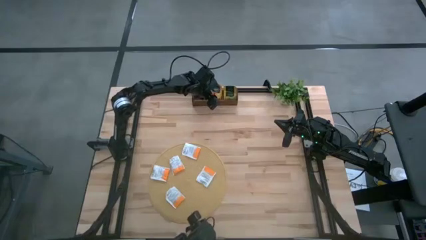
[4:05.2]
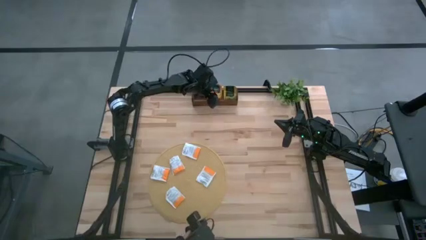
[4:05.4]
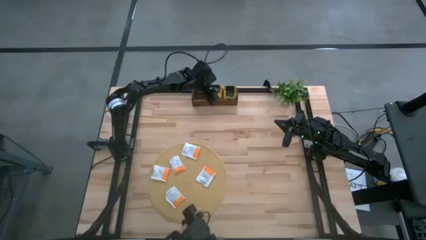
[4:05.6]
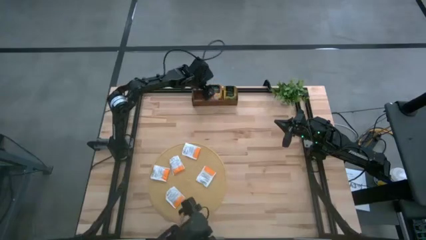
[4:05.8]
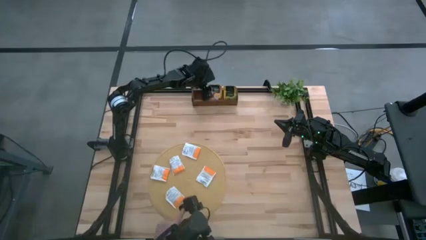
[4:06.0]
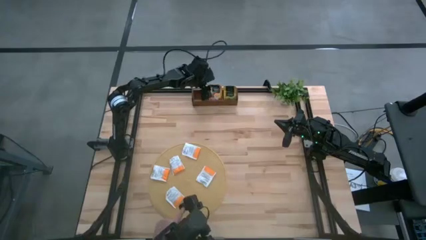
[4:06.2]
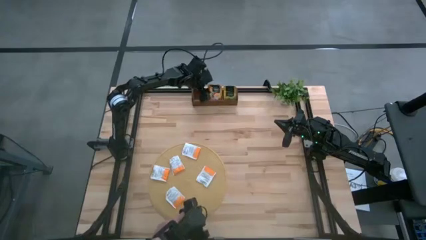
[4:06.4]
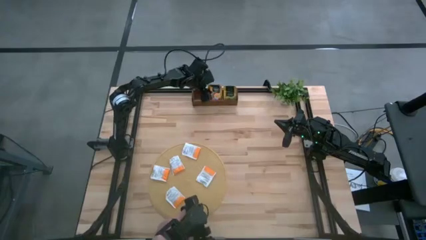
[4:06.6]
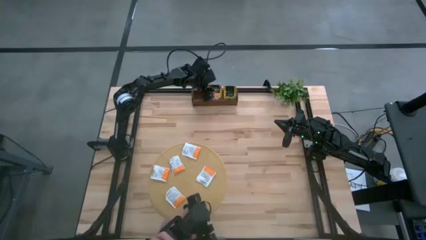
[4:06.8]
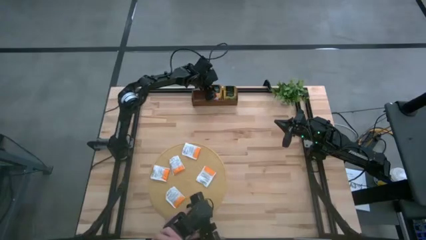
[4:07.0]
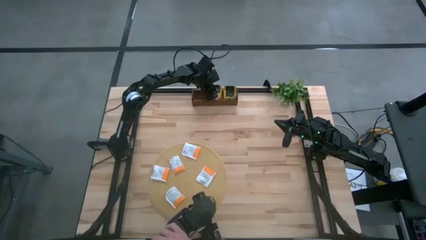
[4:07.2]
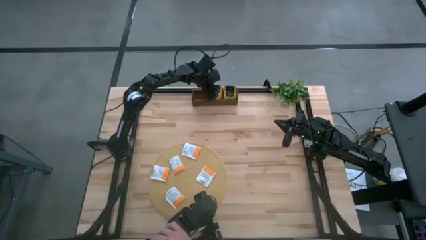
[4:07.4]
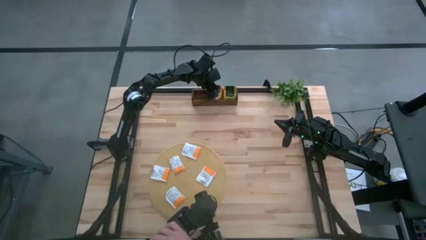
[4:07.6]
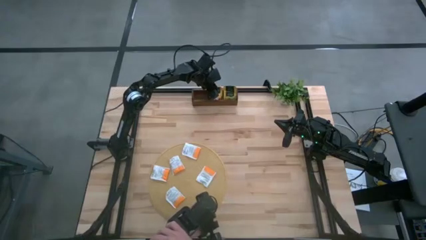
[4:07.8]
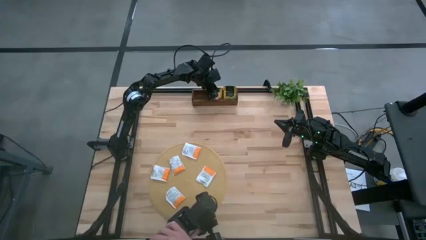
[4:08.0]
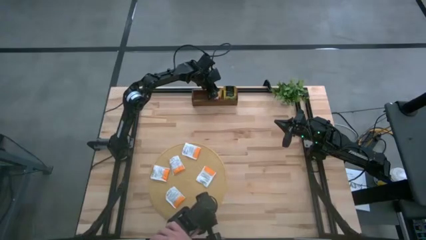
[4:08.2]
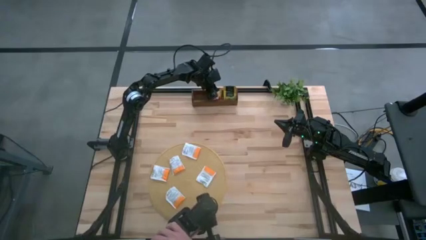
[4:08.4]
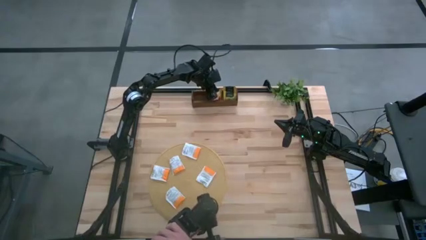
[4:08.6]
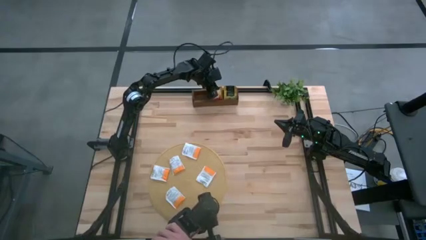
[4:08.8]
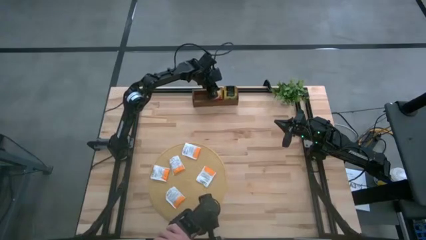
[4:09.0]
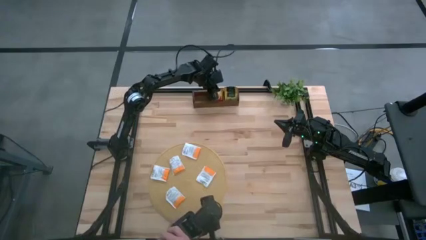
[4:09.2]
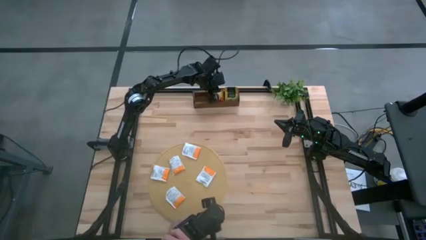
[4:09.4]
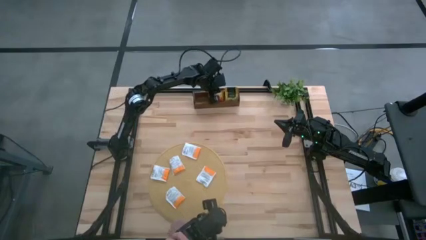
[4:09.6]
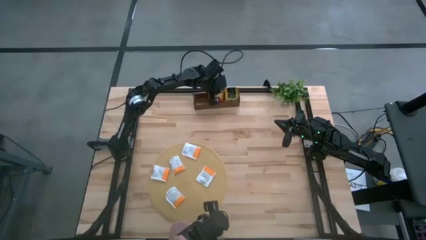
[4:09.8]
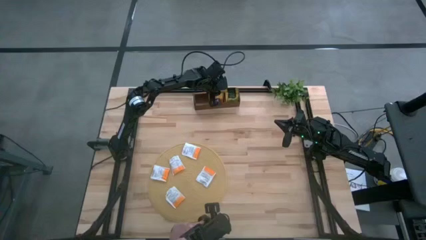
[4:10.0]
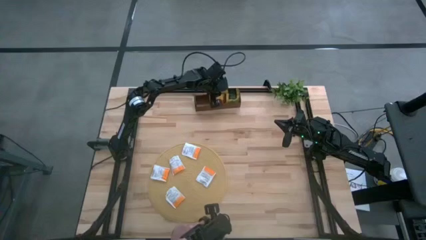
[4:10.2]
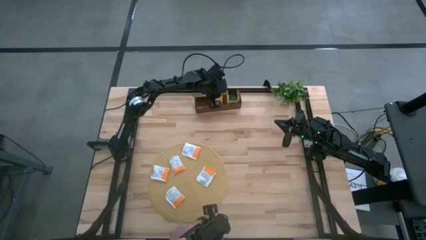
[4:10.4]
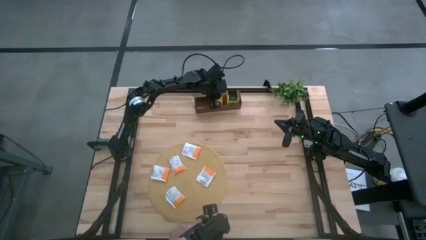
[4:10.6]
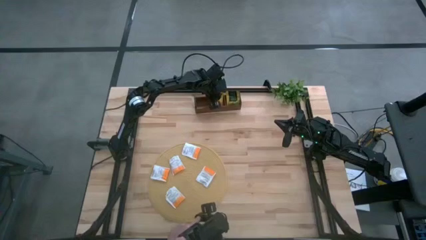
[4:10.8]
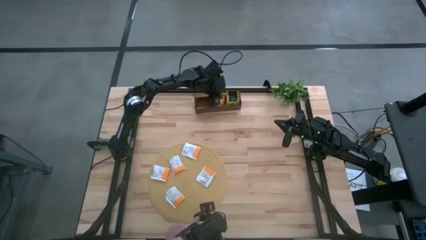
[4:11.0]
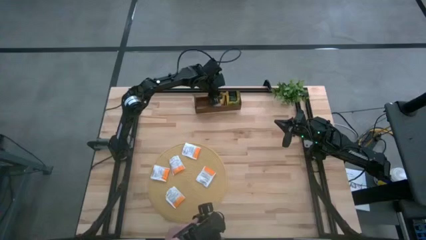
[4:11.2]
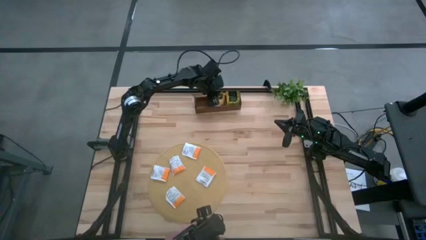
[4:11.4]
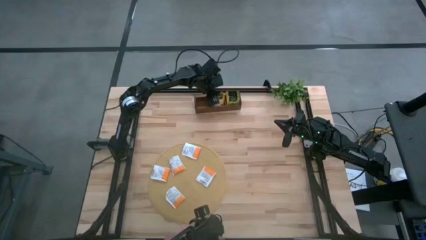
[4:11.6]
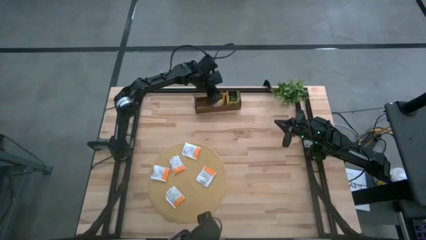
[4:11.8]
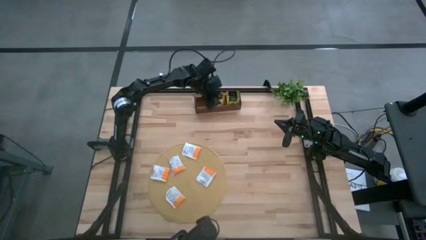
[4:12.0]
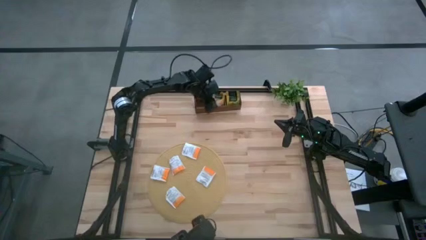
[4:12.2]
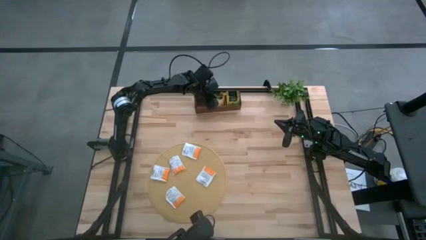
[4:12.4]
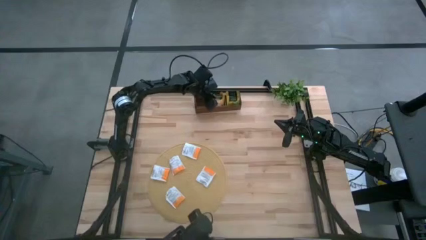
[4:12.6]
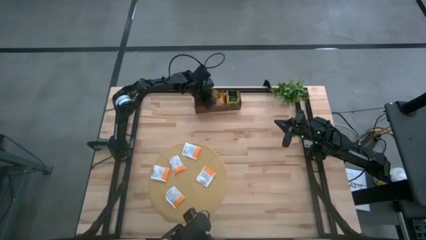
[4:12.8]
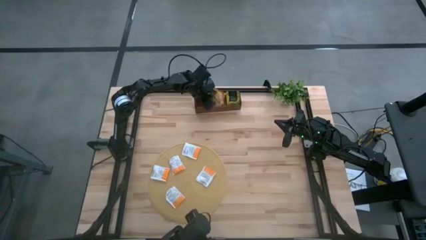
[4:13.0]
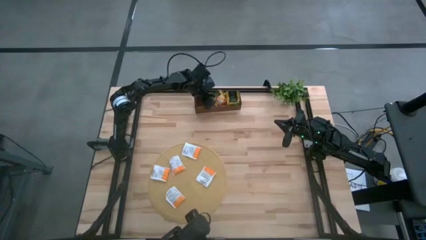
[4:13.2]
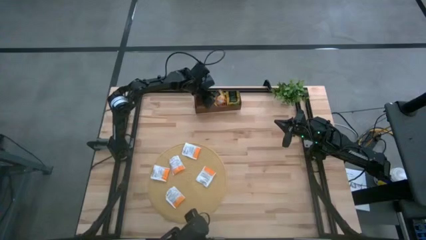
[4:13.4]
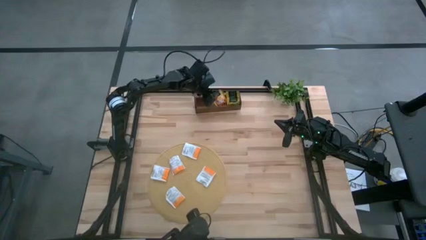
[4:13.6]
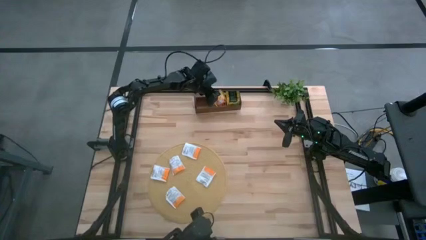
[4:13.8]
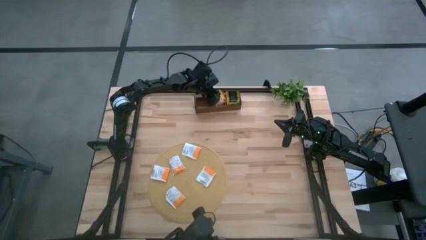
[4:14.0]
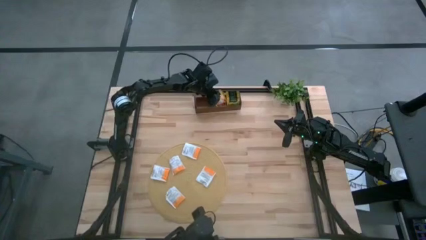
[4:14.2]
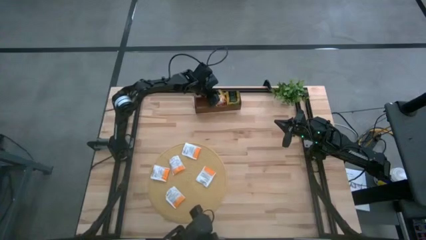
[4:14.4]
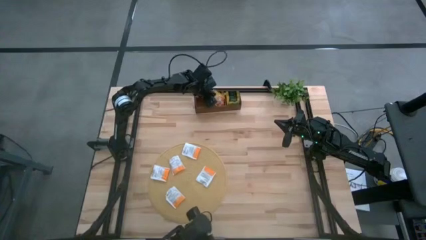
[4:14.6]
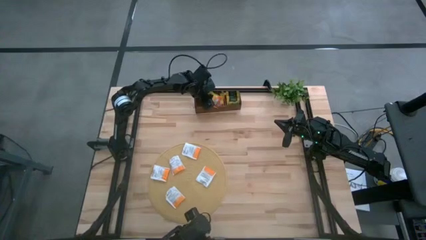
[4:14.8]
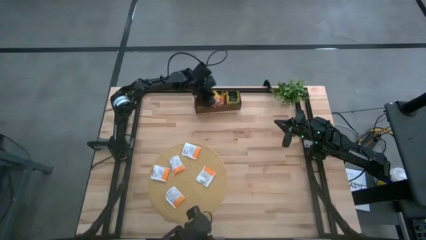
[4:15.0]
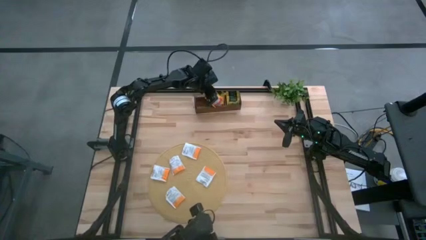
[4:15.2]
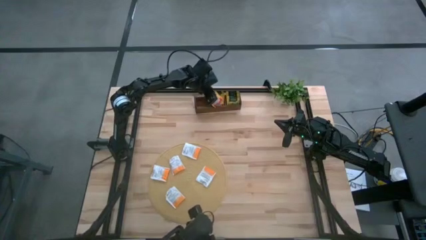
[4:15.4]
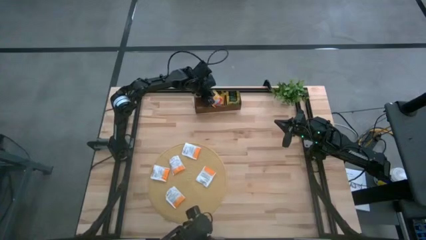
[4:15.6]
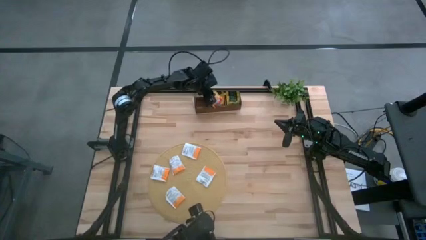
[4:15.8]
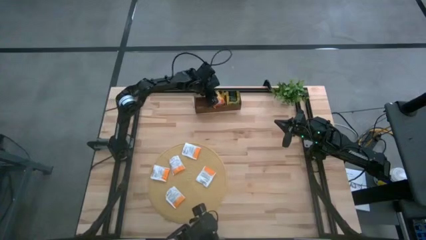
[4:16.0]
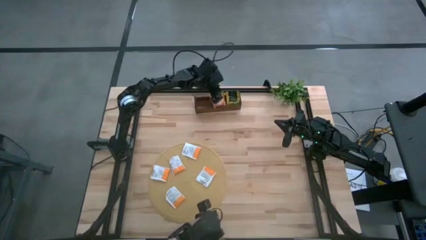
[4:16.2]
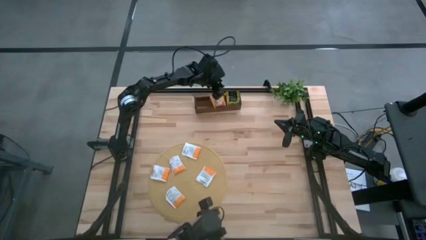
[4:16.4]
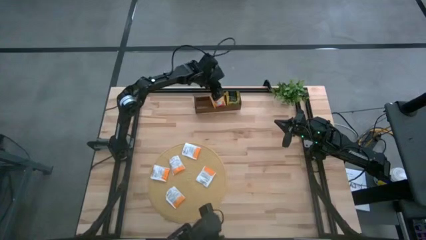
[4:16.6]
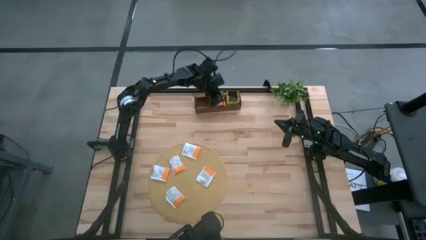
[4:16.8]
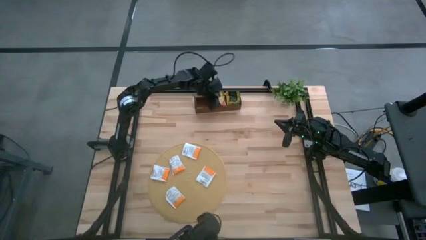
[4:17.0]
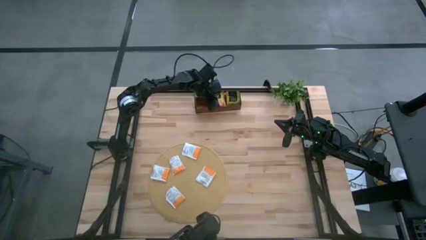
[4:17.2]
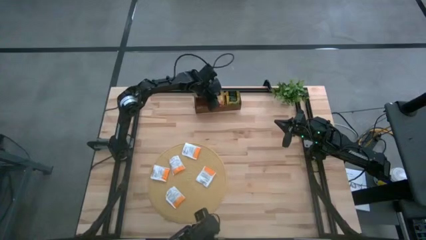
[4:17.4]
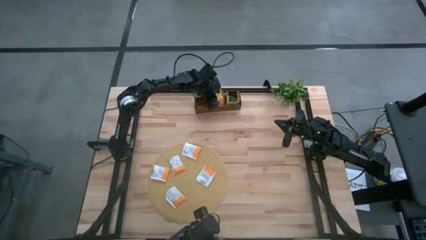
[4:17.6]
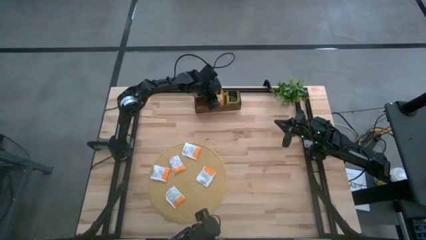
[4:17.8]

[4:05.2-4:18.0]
Task: Pick & Place Tea
Adjust the yellow tea bag in the wooden organizer

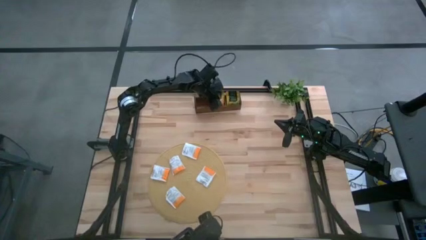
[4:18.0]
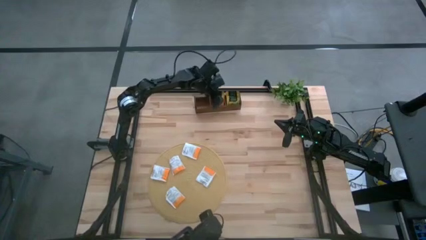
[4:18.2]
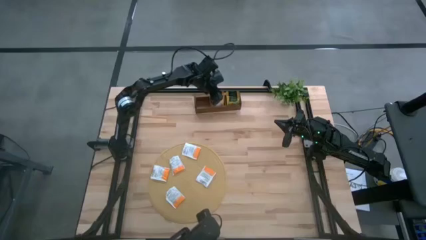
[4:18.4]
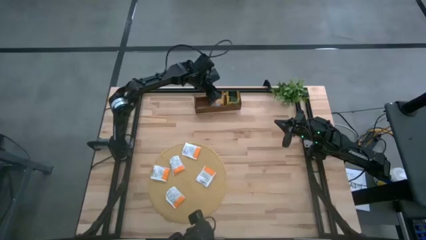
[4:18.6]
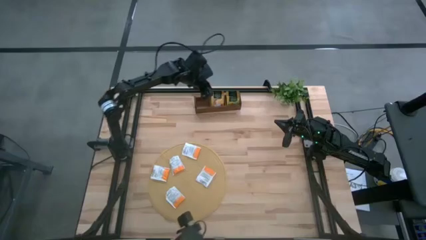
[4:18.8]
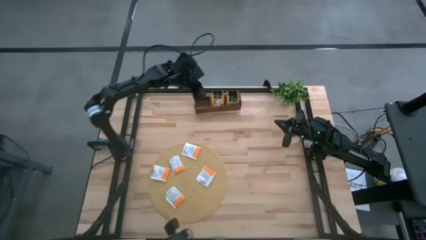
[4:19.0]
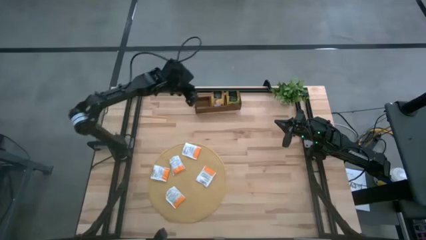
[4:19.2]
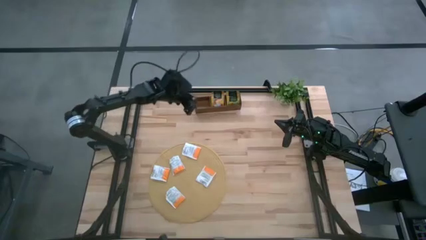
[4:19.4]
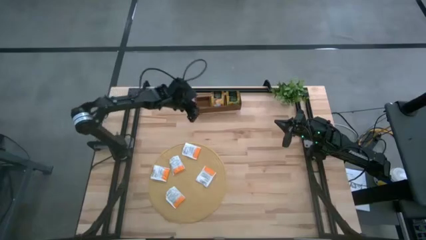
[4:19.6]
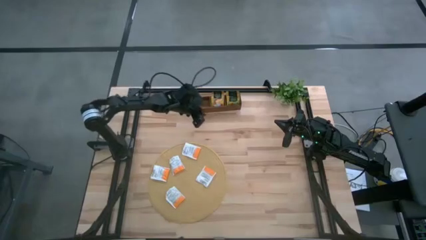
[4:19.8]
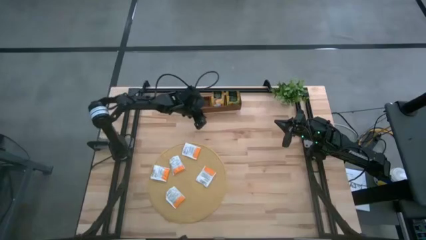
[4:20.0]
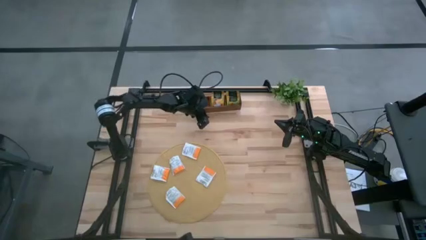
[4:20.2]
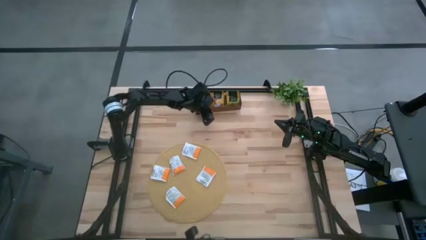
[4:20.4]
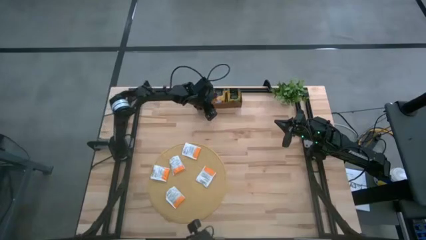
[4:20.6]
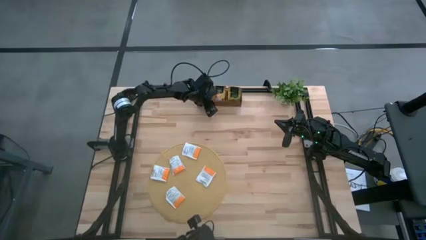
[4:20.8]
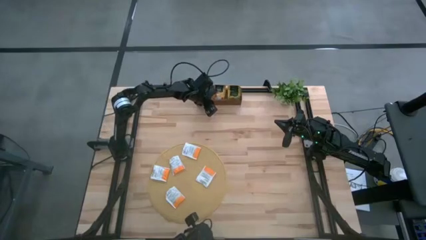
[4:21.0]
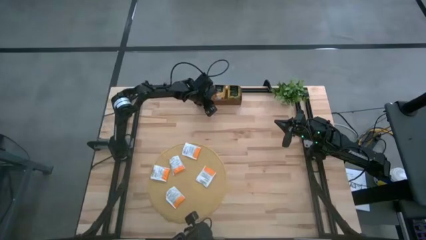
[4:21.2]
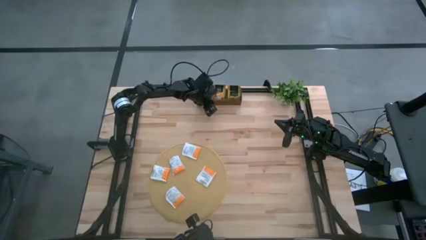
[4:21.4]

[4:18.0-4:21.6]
Adjust the wooden organizer on the table

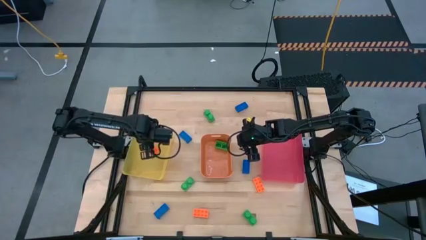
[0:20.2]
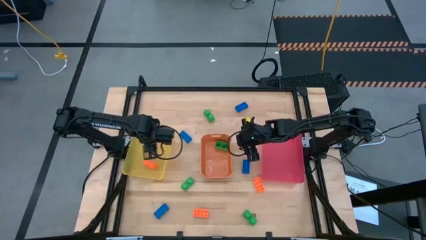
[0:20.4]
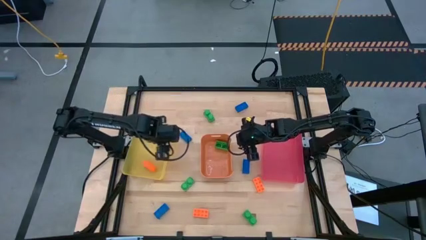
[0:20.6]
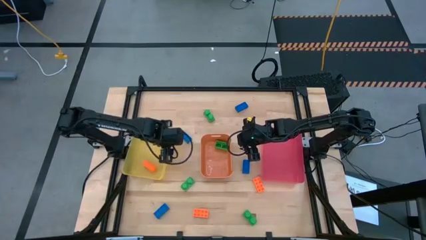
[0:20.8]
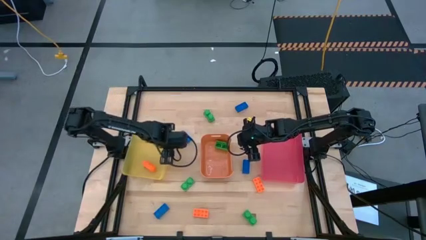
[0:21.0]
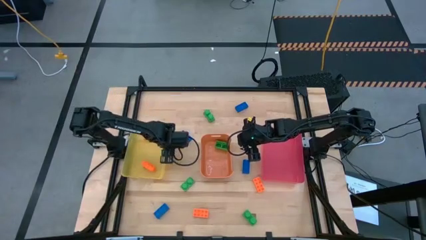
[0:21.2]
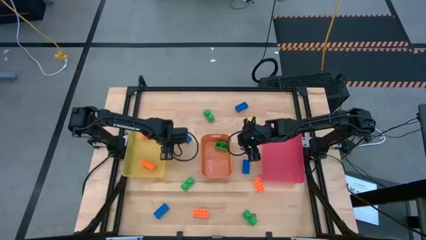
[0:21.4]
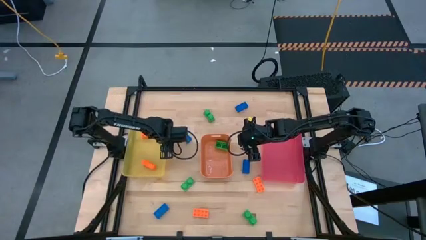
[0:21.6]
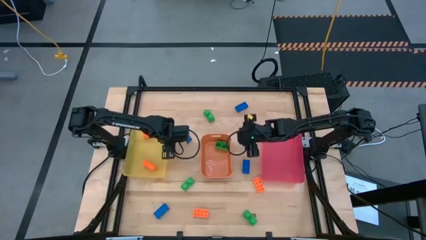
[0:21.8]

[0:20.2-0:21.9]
Task: Sort & place blocks by color
Adjust the yellow bin
